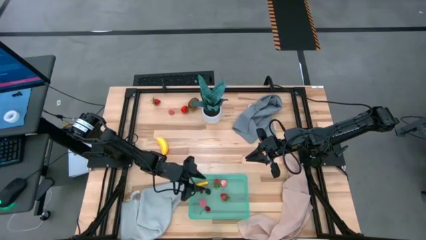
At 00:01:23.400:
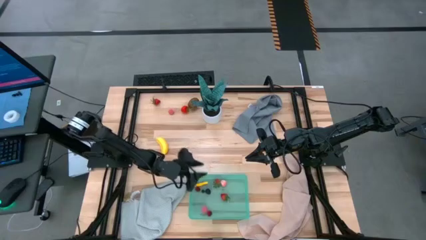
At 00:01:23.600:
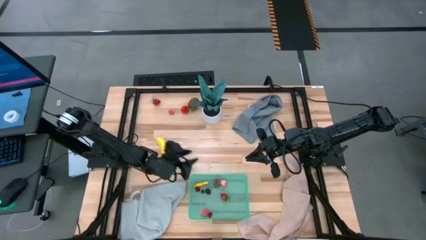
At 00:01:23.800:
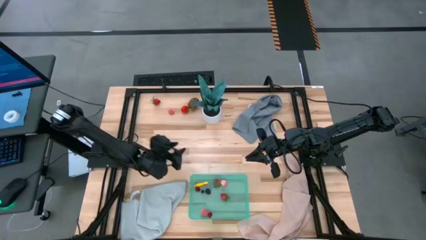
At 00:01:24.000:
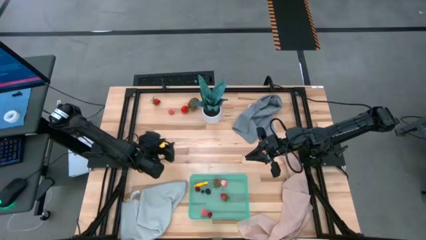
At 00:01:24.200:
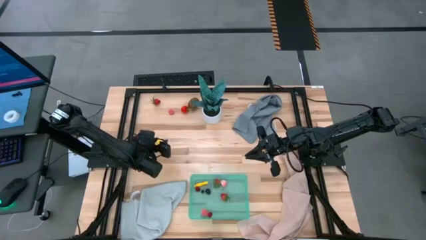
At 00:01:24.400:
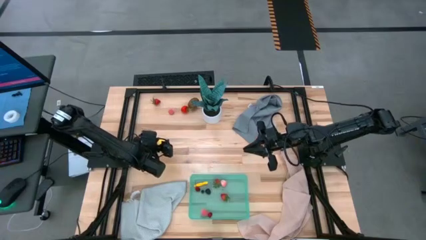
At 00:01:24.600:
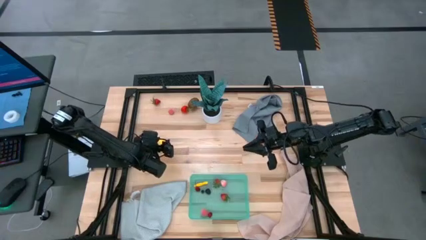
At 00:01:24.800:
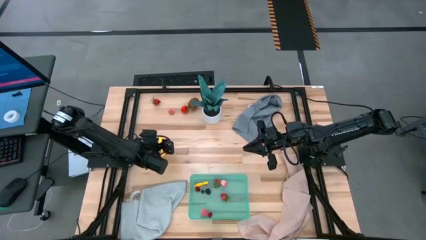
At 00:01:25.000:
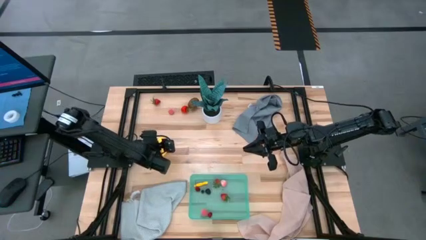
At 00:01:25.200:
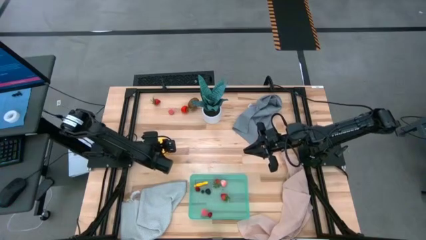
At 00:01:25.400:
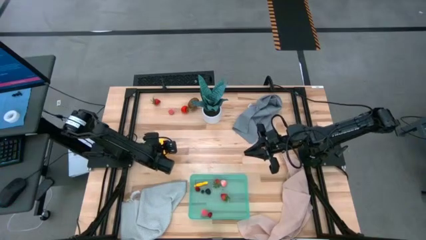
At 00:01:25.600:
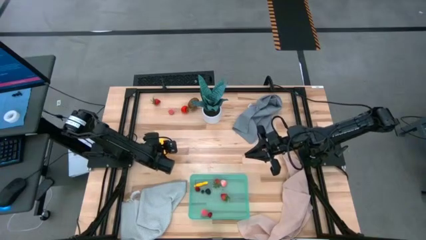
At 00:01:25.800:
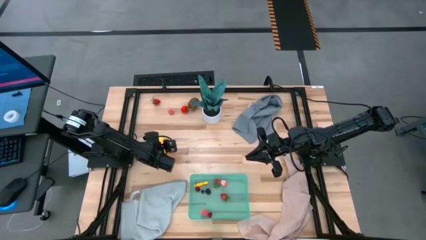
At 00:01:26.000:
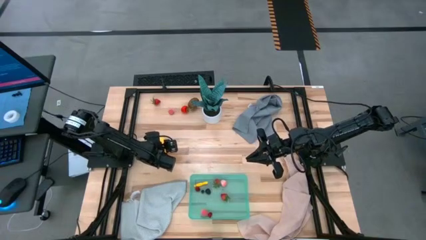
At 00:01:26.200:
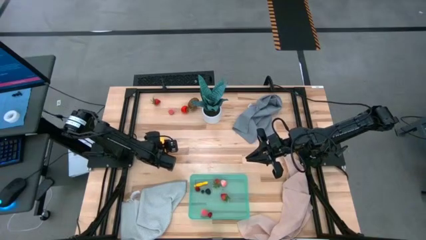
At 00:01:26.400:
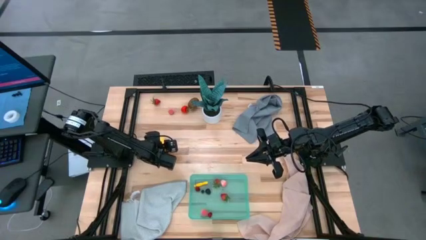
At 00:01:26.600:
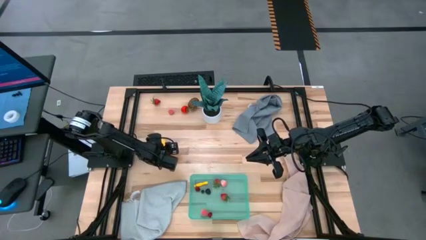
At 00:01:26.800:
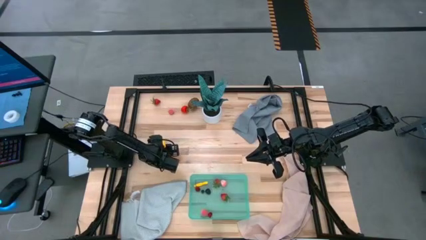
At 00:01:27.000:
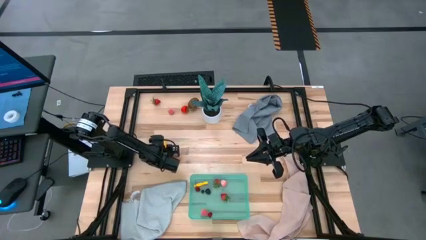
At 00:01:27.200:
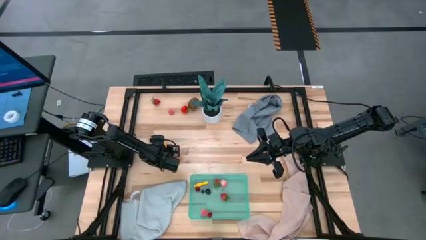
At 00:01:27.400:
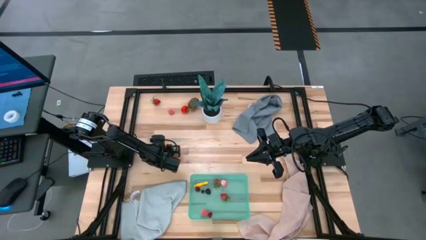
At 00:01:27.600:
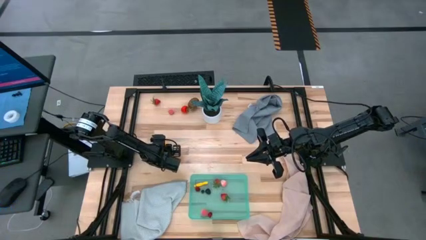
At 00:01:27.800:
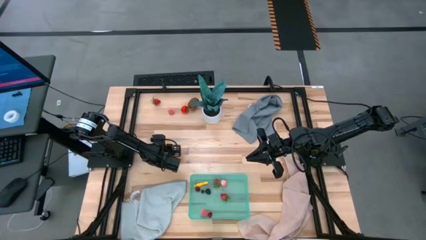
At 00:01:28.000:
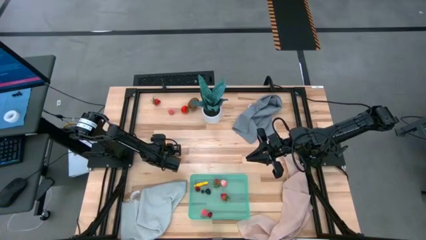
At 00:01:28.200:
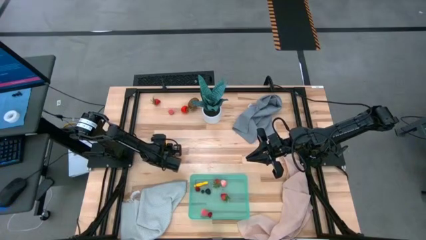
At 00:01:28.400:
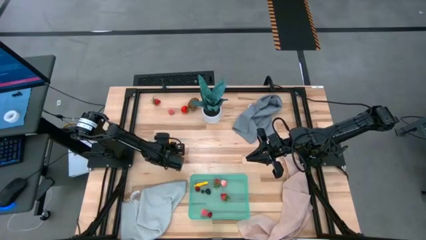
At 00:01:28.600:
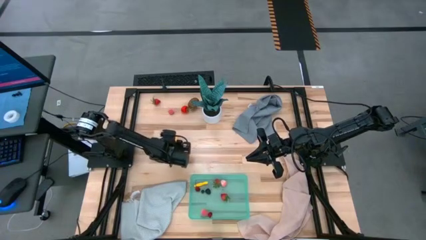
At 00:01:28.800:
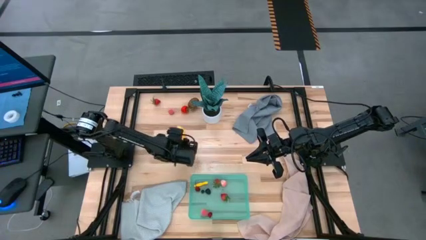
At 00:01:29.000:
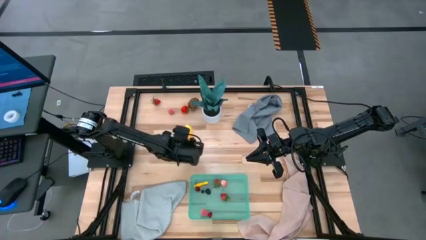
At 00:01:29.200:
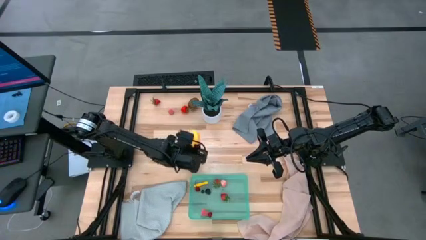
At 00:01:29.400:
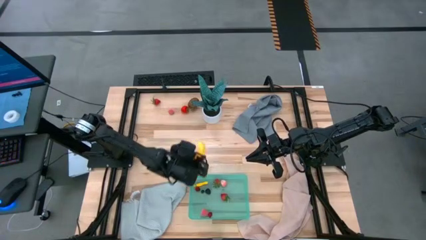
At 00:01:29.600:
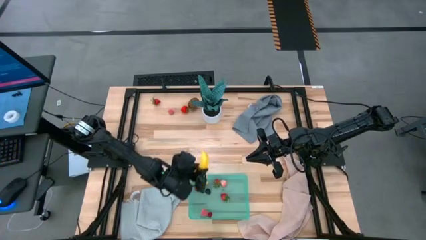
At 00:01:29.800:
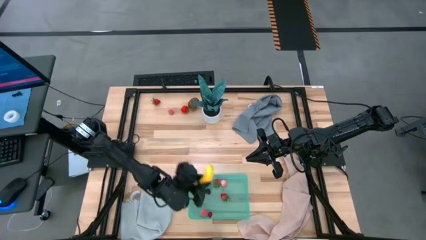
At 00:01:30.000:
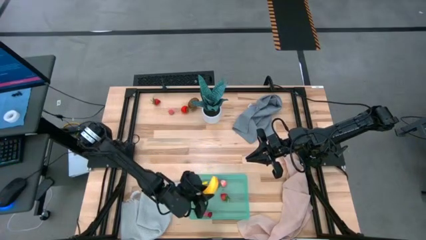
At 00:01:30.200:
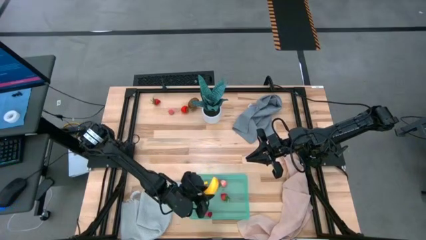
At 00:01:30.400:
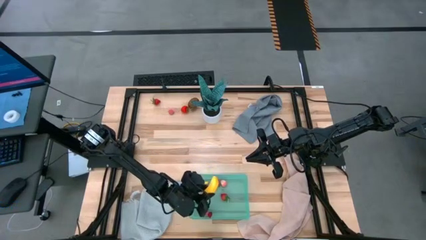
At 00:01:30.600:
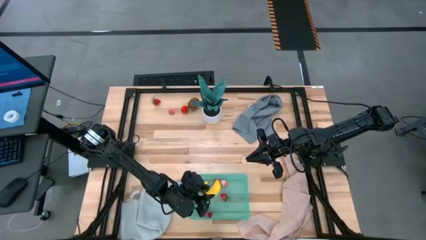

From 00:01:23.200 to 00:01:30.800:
Task: Pick and placing Produce into tupperware
Put the yellow banana into the green bin

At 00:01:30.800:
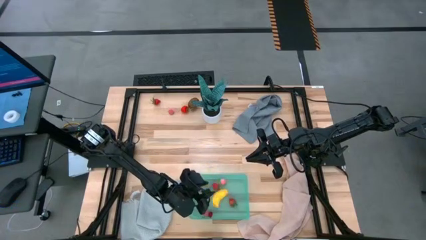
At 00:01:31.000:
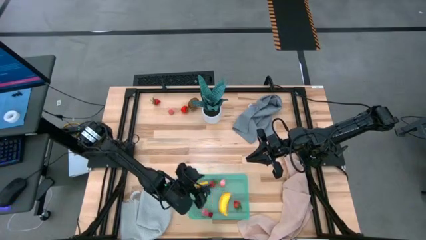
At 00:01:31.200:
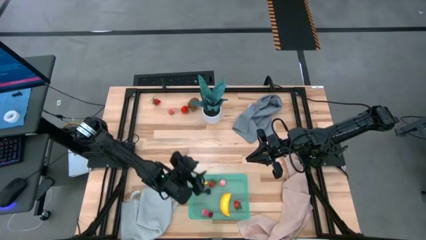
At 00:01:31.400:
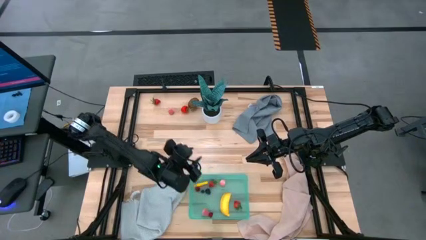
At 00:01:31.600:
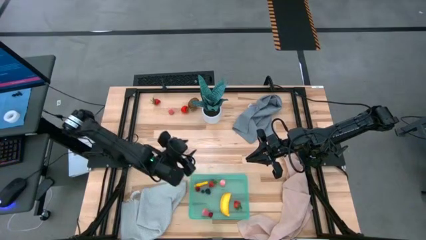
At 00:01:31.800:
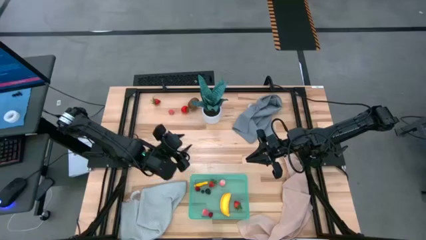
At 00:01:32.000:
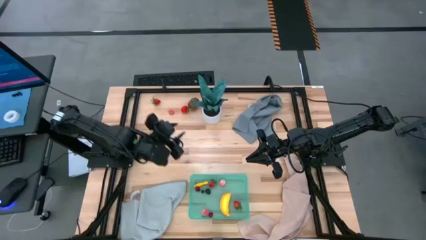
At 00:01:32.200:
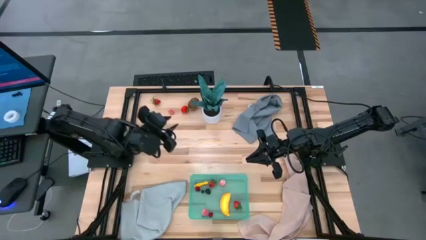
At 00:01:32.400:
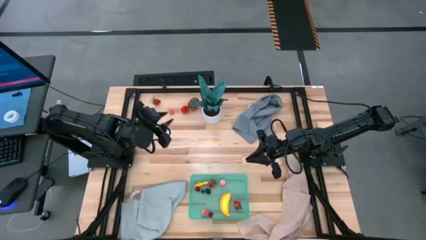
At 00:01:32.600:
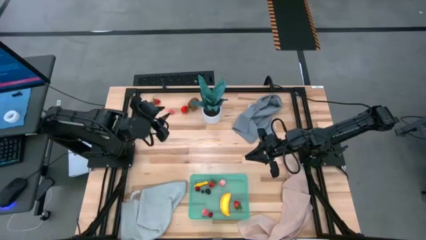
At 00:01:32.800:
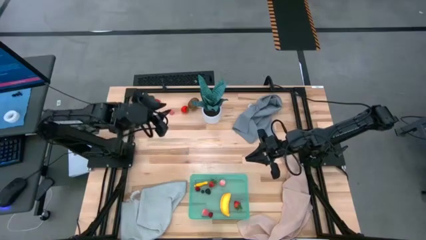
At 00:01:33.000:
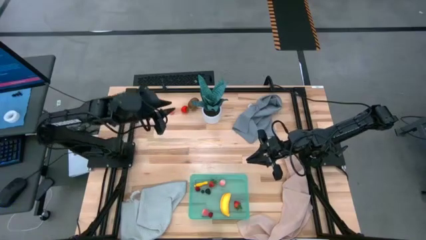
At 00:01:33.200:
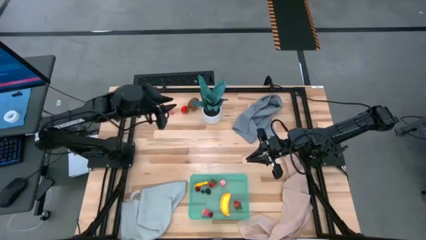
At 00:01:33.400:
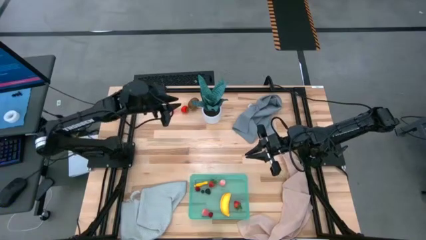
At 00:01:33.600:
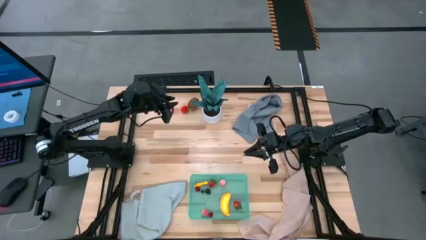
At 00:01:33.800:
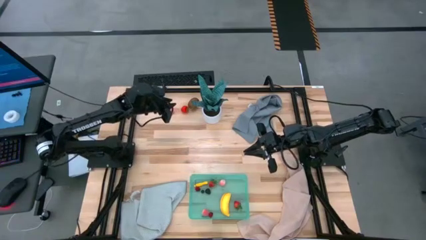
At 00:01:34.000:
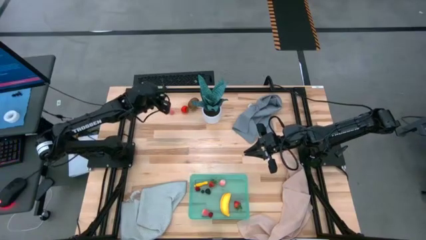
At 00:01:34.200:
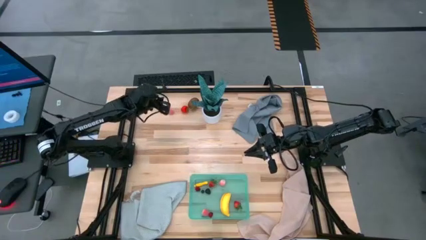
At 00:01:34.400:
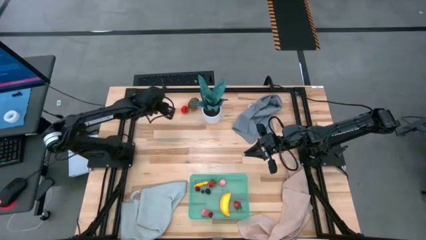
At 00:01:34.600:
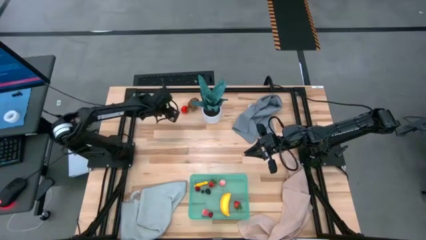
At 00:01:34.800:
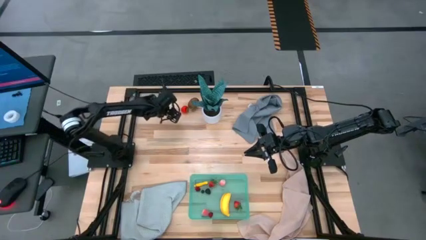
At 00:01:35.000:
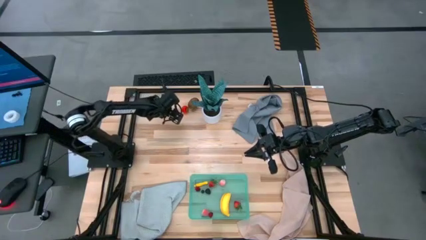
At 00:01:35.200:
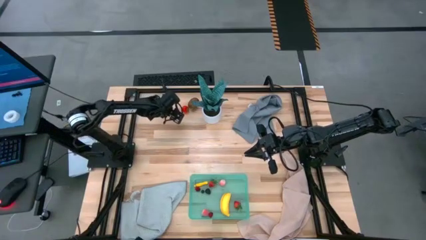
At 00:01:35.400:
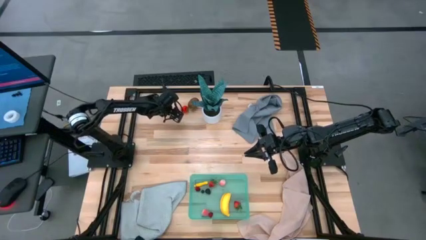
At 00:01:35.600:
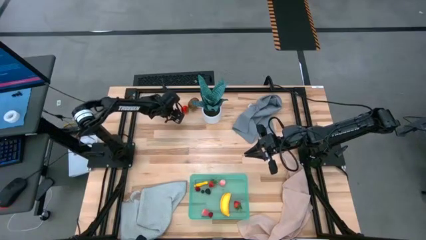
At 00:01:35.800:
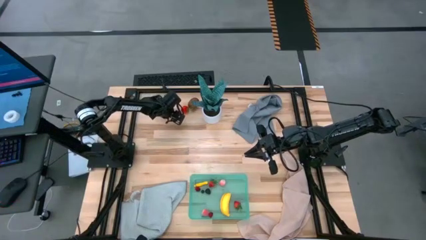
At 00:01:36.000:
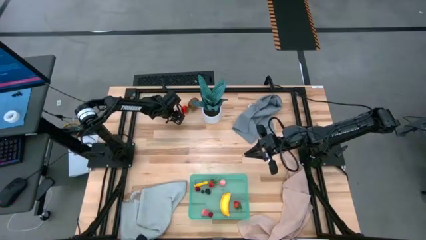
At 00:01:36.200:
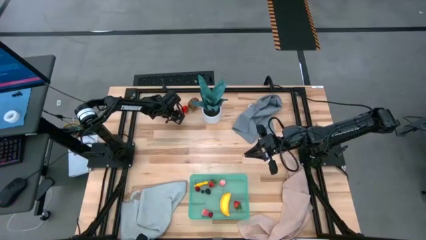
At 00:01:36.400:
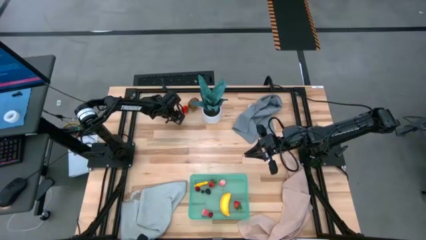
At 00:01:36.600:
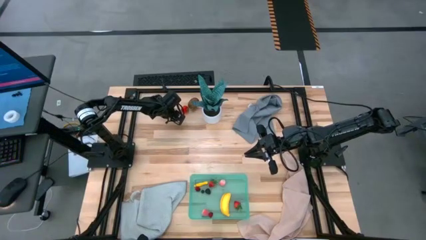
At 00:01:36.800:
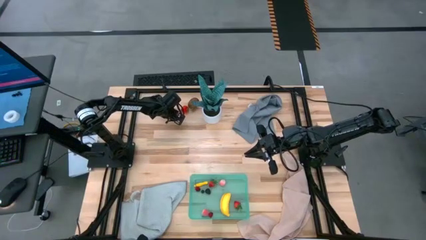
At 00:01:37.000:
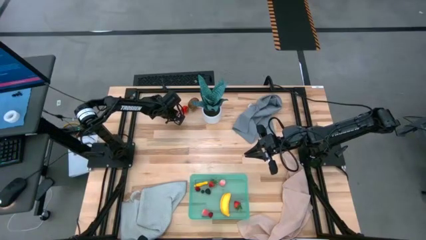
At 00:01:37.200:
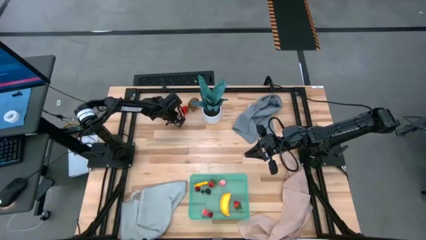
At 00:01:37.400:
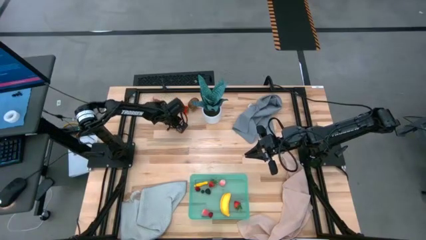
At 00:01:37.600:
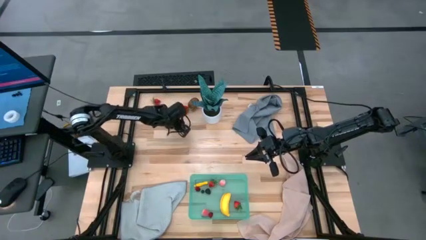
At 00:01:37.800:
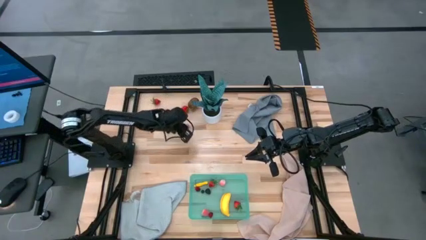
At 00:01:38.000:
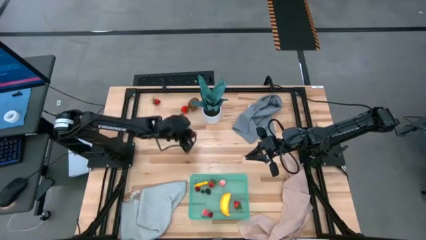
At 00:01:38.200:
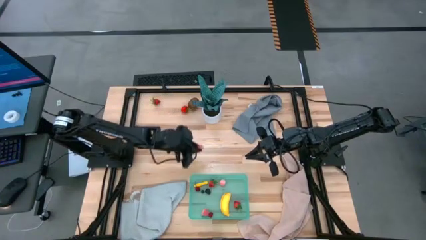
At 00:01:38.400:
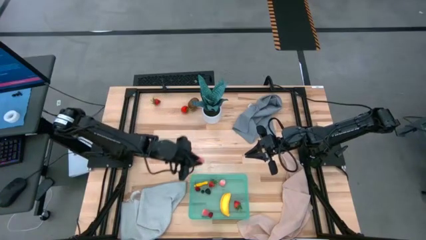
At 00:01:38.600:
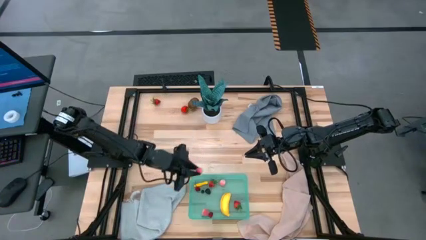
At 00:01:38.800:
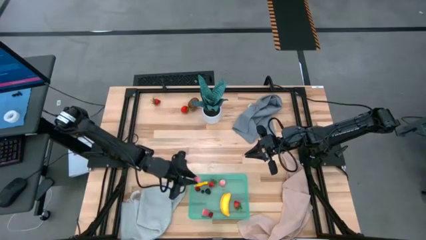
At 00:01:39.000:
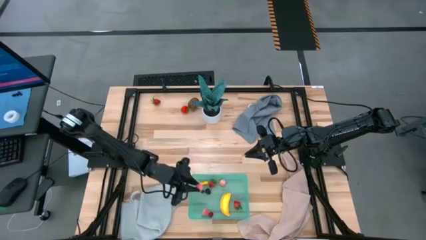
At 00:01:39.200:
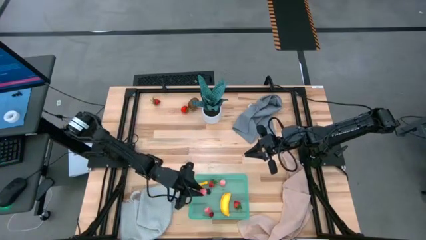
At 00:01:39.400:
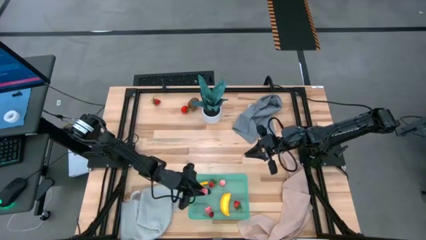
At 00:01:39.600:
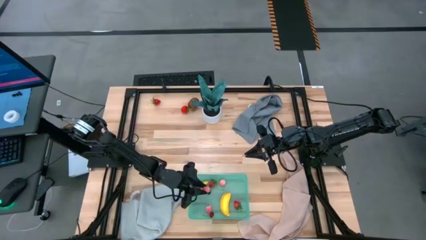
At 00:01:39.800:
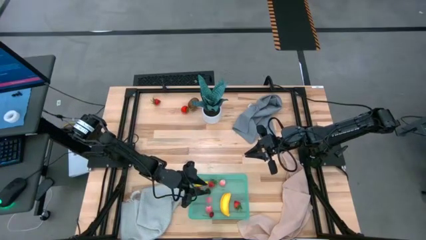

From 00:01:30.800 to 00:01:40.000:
Put the pink peach into the green bin
